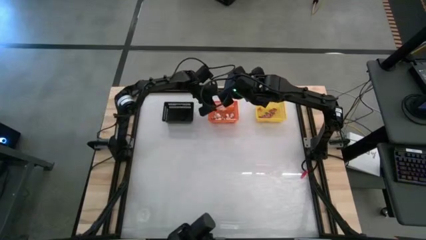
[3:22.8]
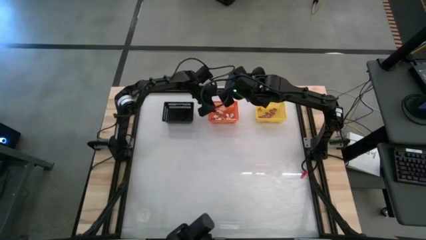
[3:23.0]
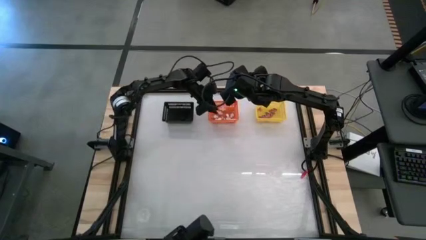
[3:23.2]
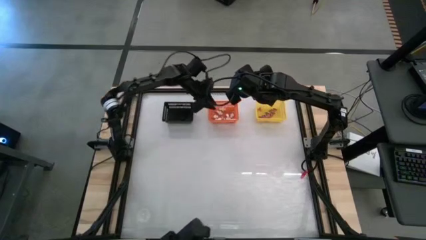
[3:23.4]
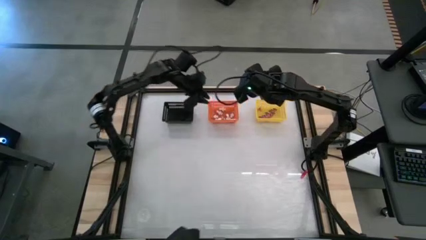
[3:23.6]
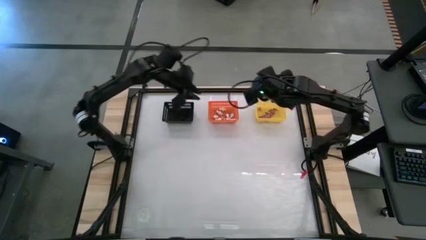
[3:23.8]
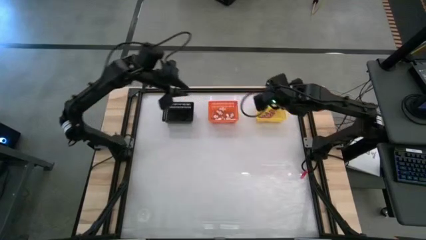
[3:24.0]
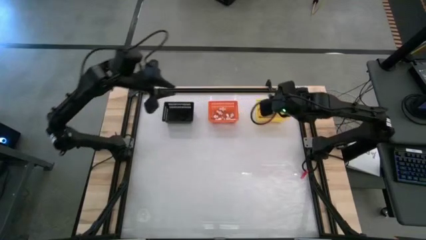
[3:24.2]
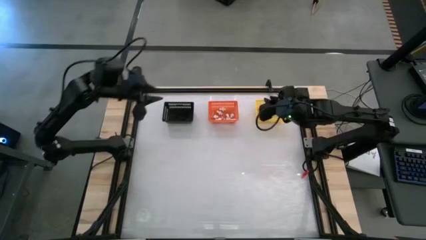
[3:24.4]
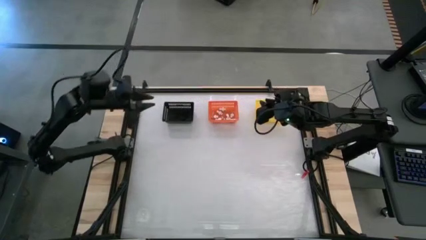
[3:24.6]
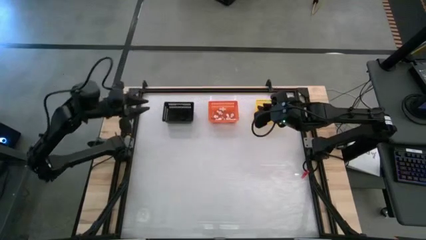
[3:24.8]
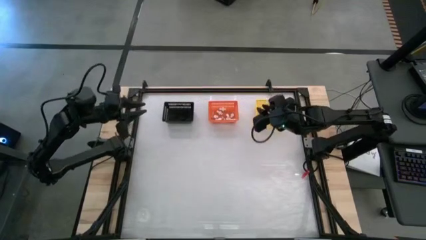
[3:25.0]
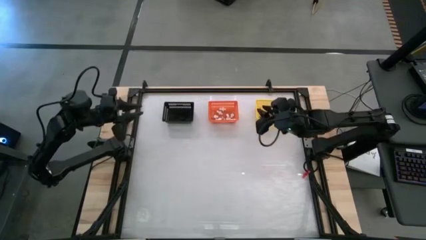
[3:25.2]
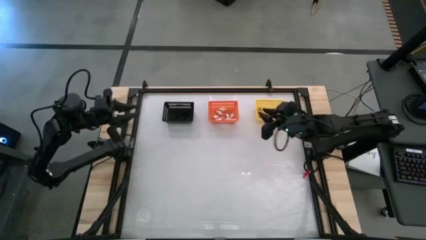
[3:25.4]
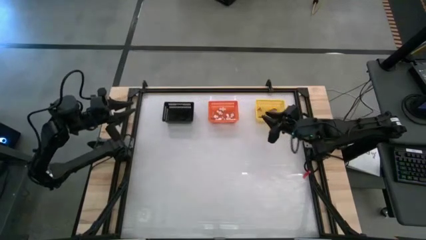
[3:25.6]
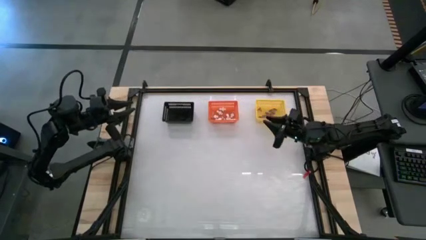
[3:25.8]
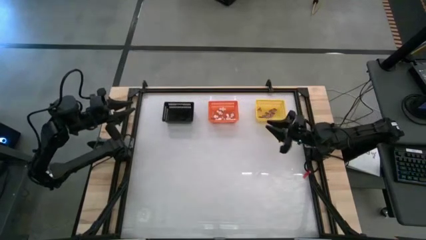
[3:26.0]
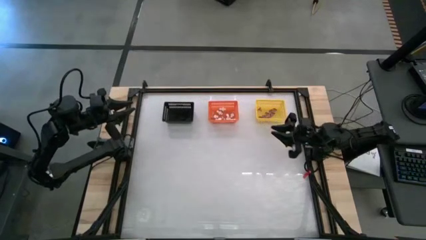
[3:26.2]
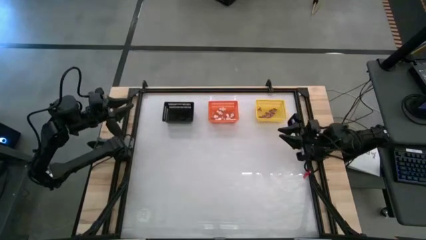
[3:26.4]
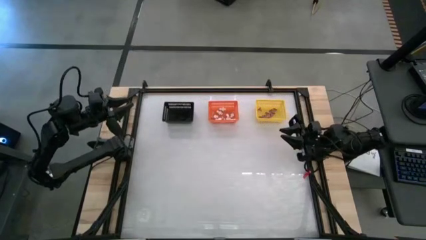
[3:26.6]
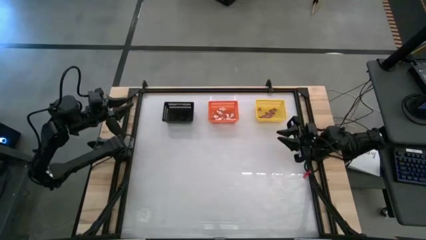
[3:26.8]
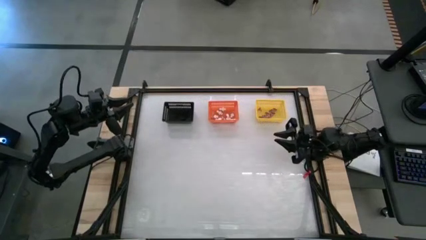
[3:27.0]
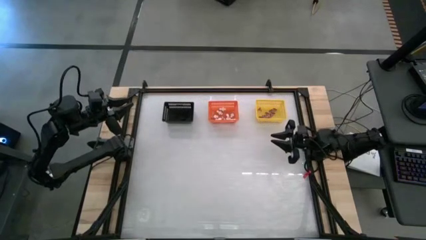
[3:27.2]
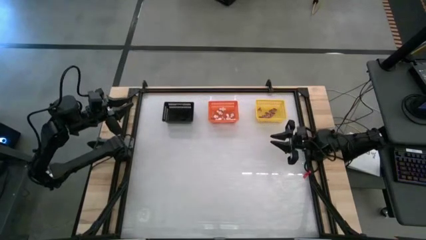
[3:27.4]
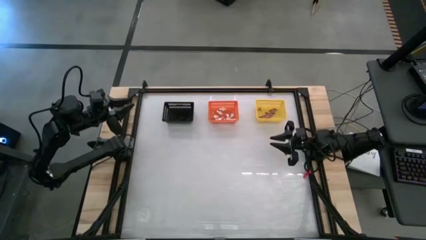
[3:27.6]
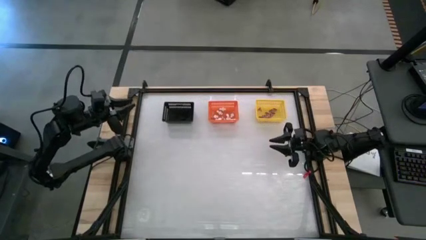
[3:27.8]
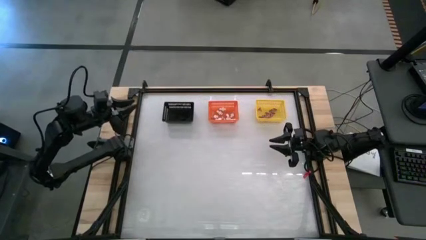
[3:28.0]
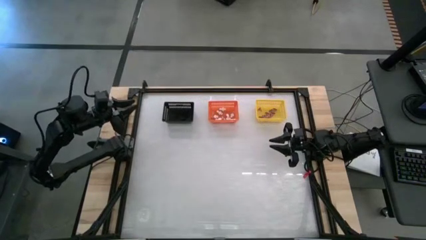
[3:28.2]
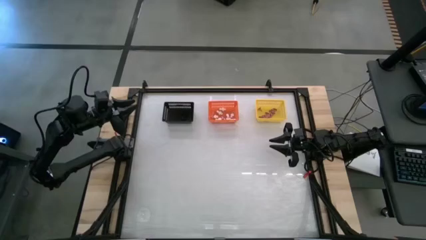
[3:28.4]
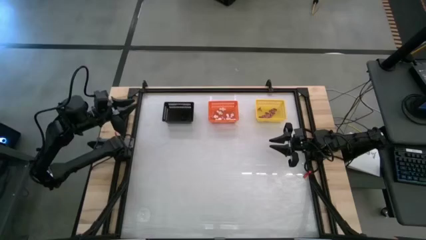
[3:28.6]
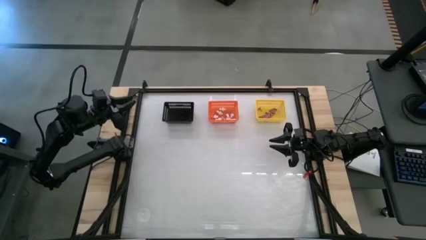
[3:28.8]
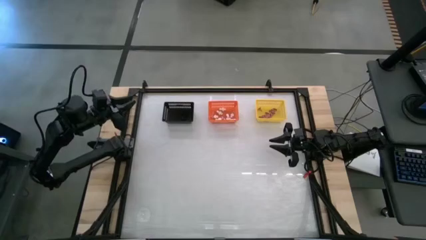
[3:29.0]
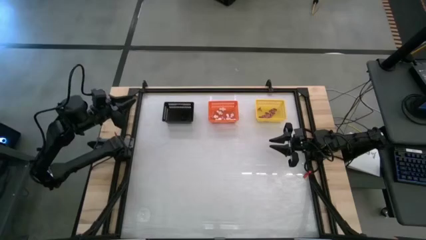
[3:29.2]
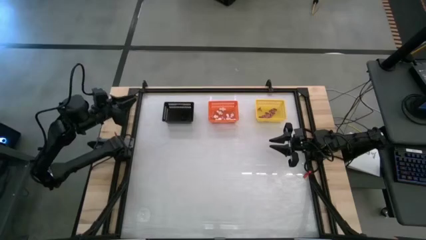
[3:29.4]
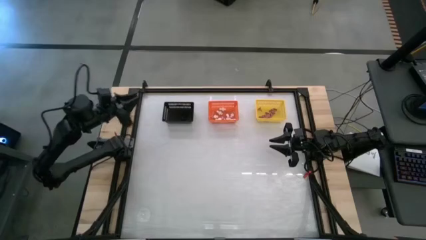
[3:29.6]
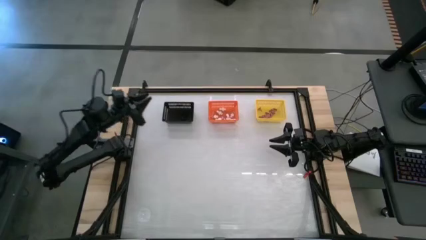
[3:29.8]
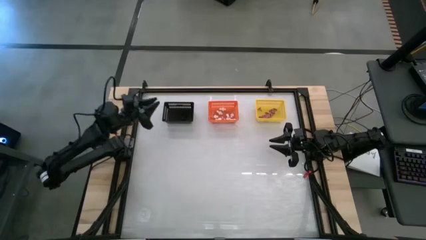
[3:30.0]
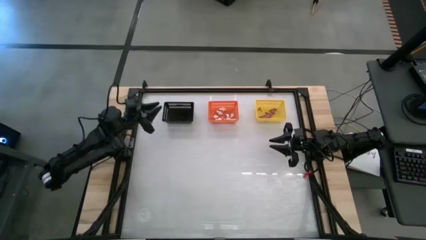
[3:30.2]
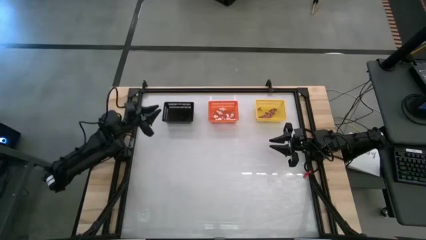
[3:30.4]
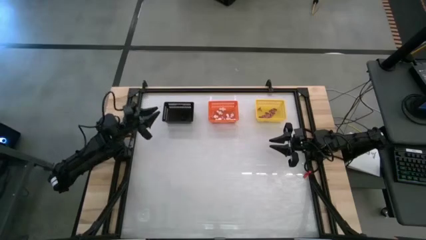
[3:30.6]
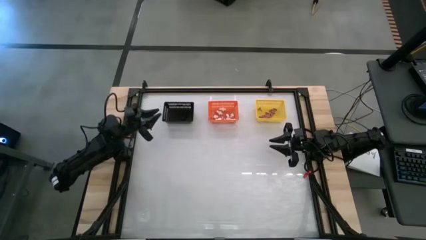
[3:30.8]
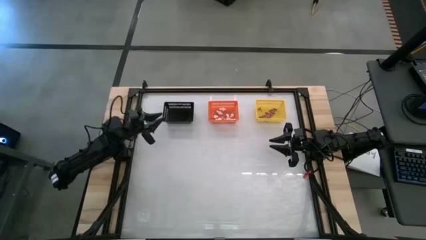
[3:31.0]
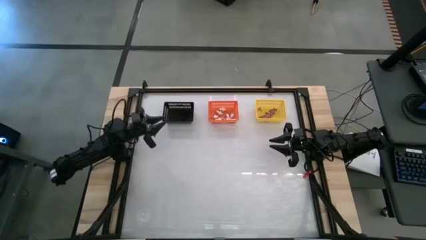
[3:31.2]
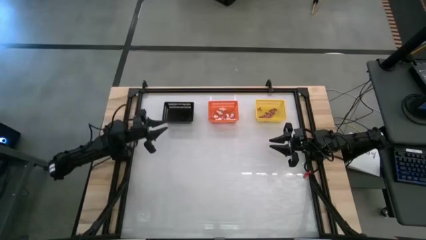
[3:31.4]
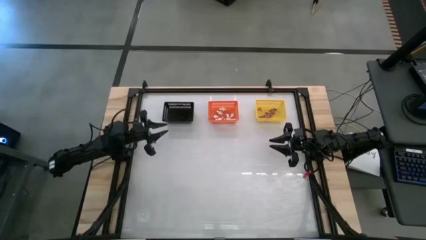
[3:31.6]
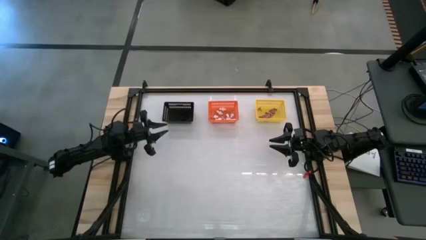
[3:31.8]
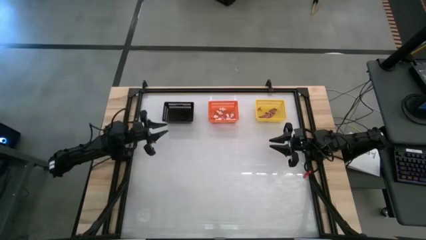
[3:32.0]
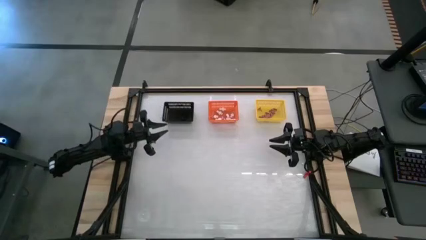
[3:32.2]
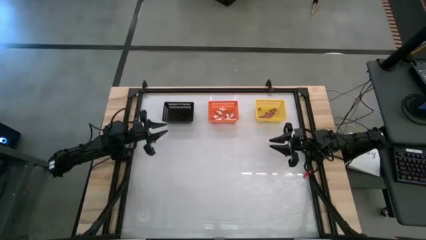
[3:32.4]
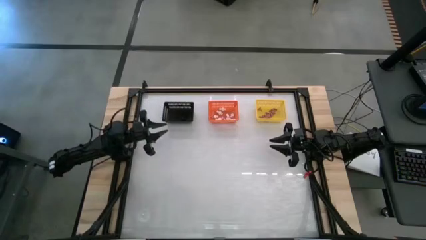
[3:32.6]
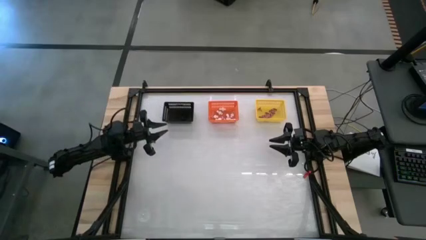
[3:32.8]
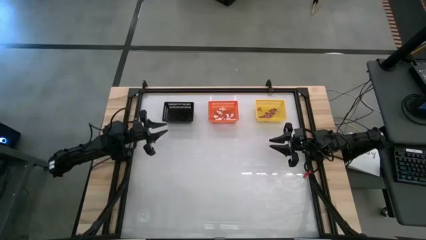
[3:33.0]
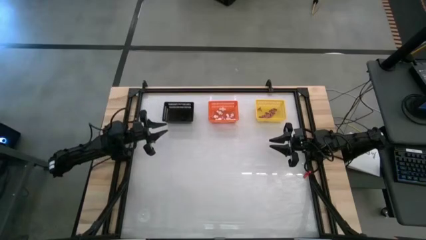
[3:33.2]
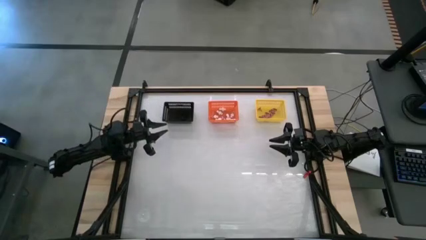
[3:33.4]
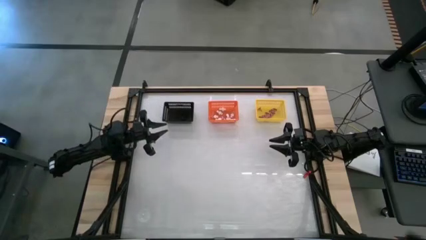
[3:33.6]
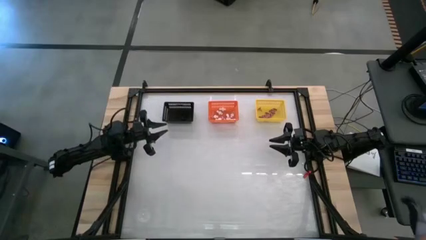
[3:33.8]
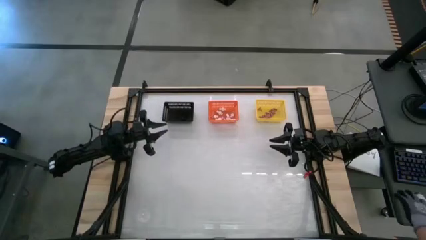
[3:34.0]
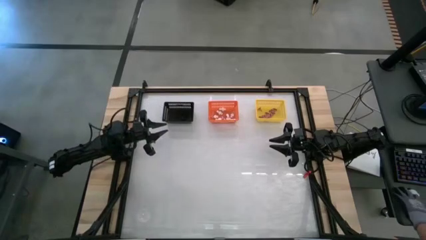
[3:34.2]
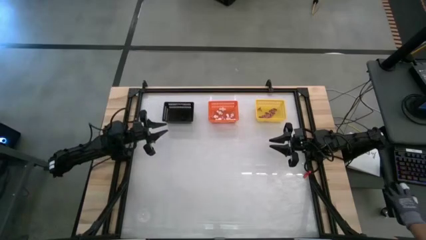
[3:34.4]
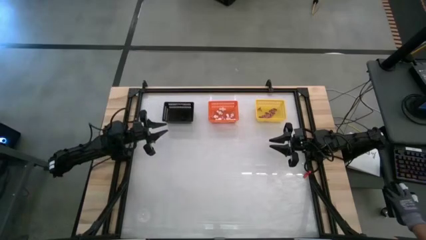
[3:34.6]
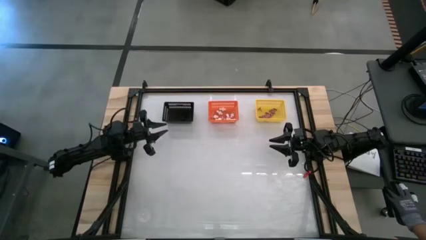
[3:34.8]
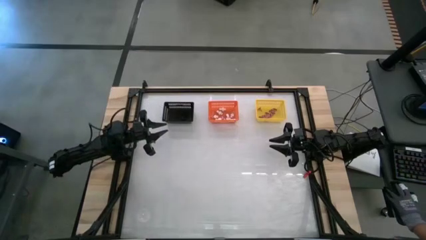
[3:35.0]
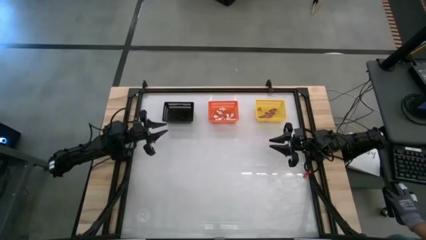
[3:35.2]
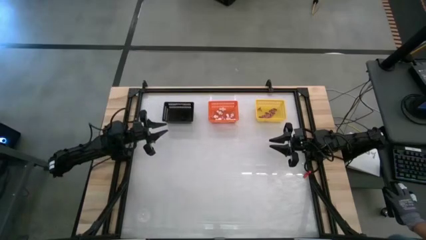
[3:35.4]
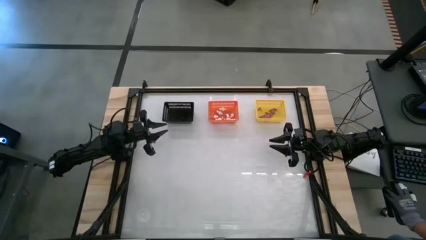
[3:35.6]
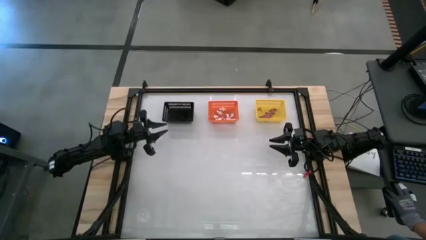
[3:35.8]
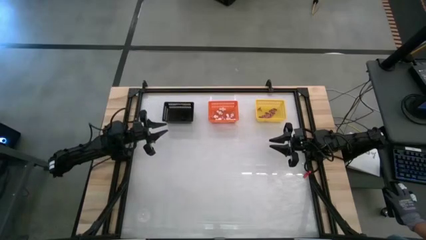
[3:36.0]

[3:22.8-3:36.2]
Task: Sort Halloween decoration
Return to home position
